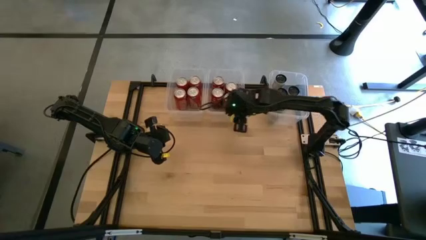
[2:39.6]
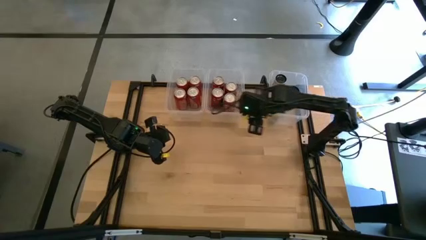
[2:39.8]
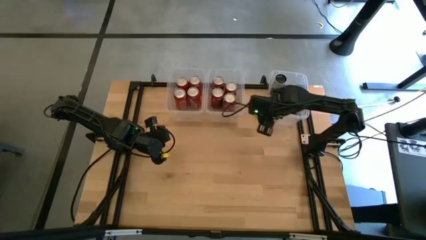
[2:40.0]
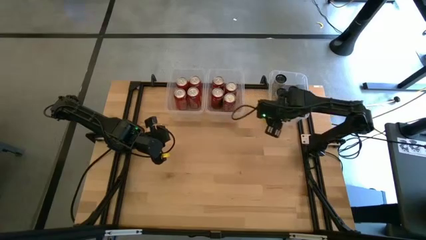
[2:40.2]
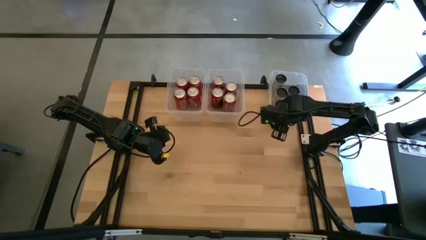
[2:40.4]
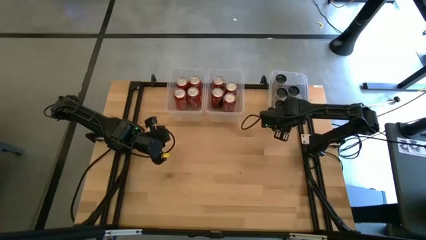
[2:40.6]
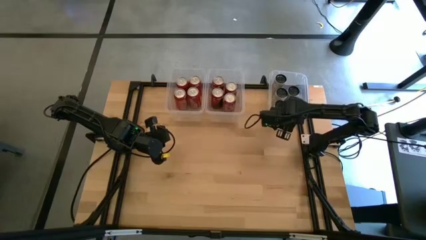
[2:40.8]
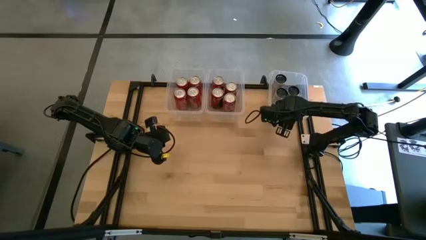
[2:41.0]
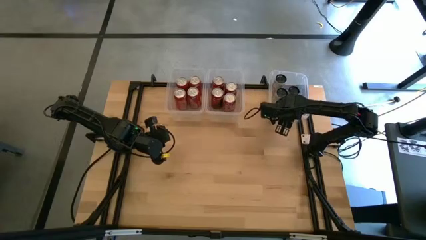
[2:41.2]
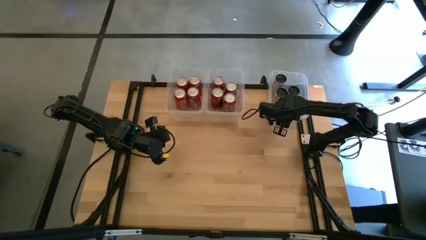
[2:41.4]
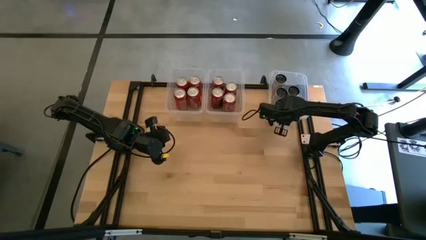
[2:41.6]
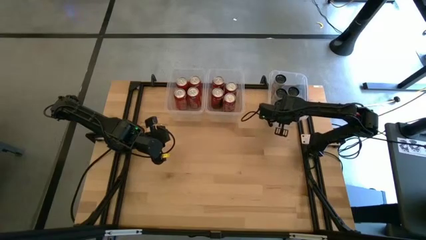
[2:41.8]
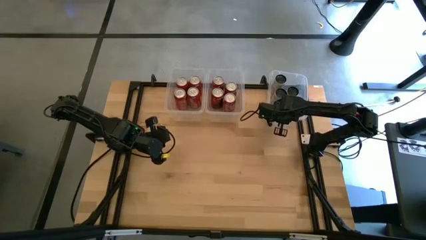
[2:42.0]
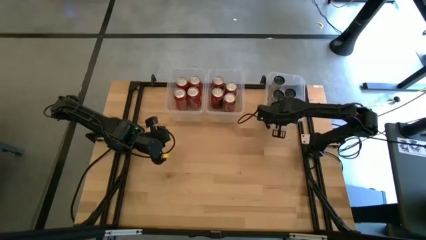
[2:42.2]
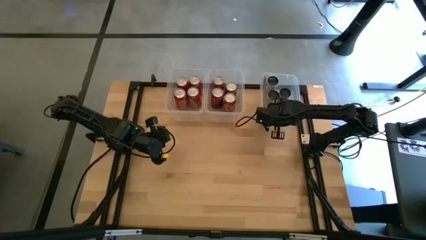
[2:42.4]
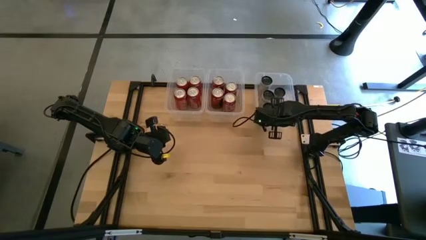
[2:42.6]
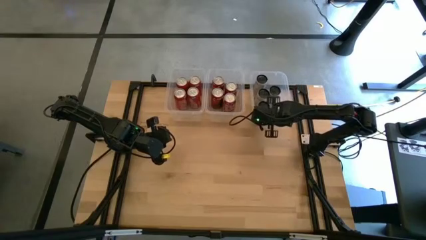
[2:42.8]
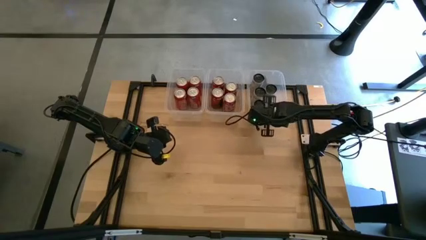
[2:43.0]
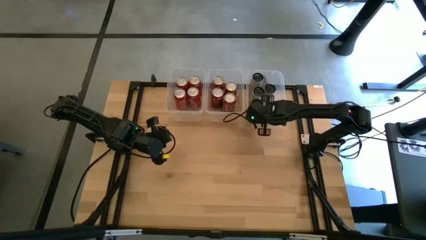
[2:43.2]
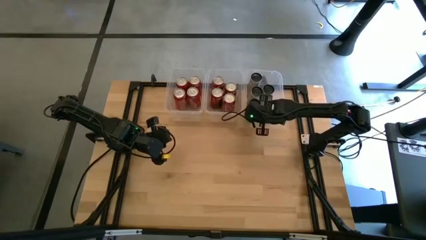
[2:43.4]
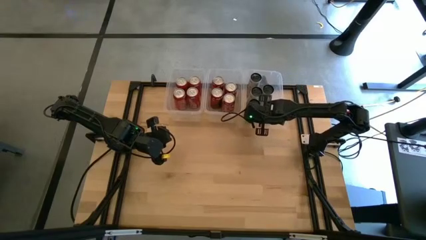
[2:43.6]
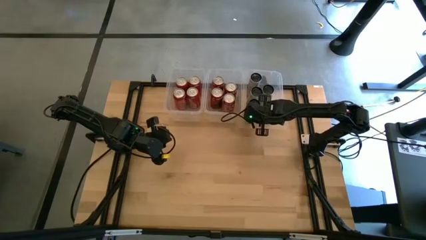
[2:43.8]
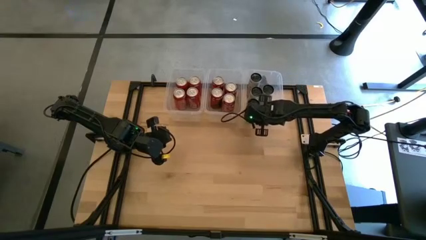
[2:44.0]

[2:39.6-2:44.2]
Task: Sort soda cans
Adjust the right transparent bin

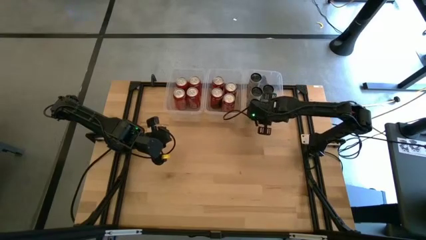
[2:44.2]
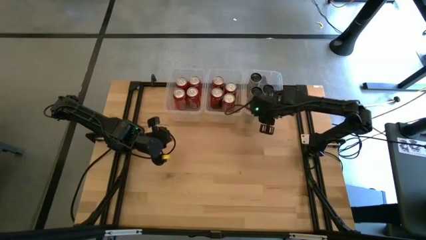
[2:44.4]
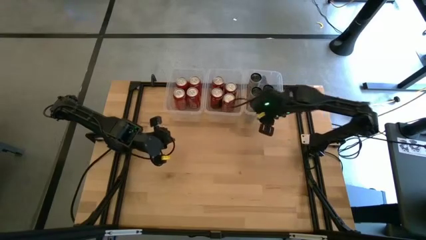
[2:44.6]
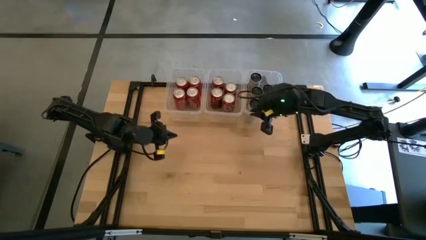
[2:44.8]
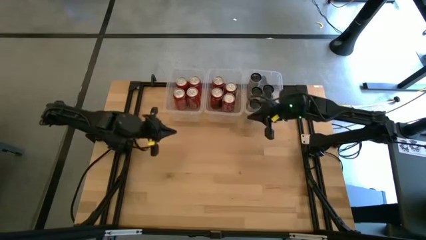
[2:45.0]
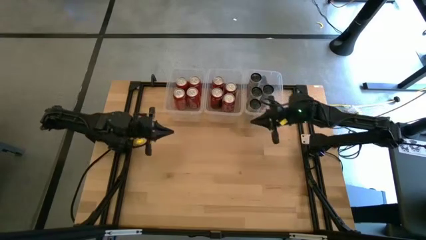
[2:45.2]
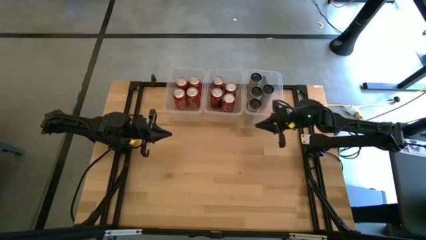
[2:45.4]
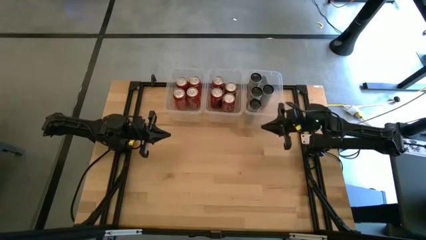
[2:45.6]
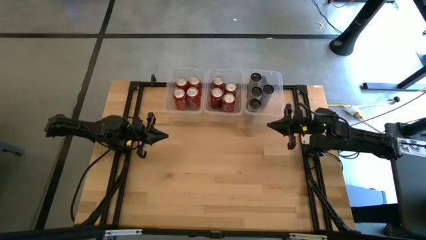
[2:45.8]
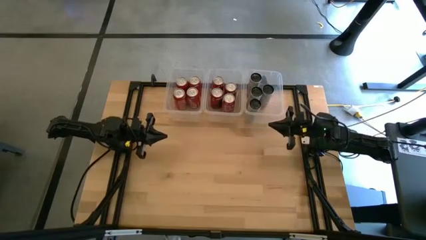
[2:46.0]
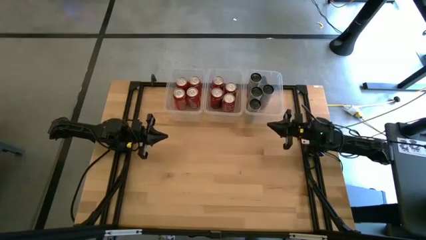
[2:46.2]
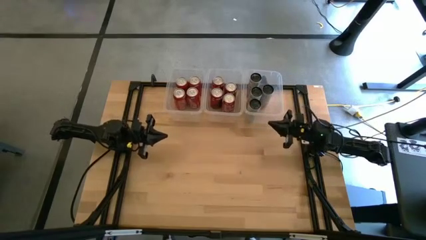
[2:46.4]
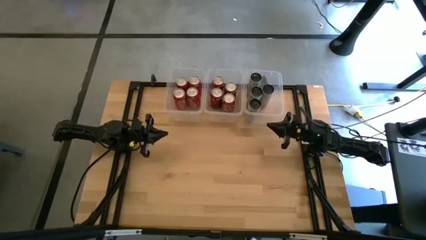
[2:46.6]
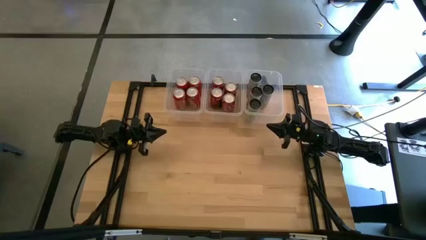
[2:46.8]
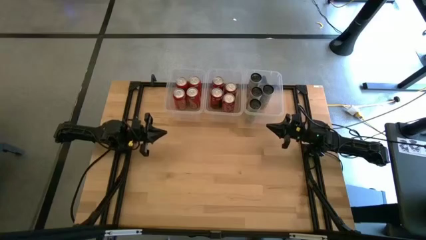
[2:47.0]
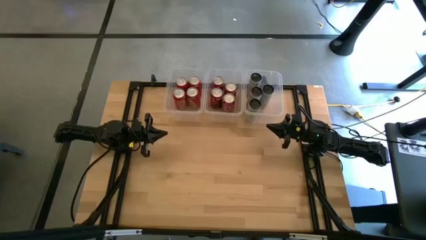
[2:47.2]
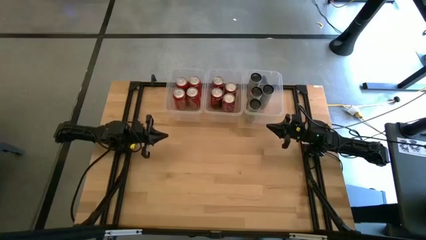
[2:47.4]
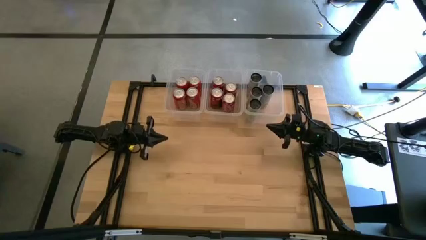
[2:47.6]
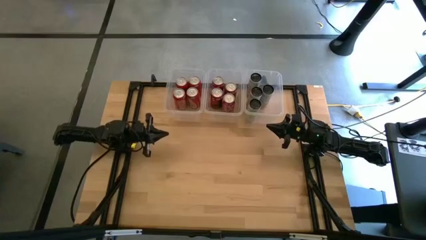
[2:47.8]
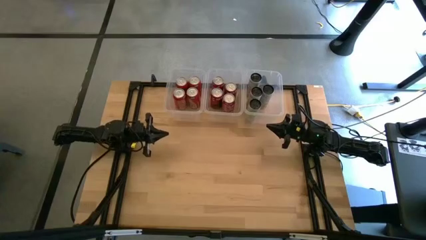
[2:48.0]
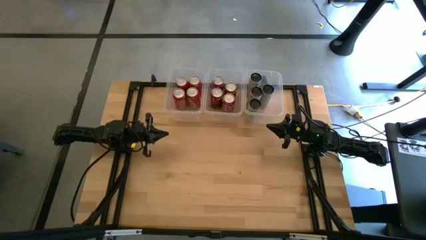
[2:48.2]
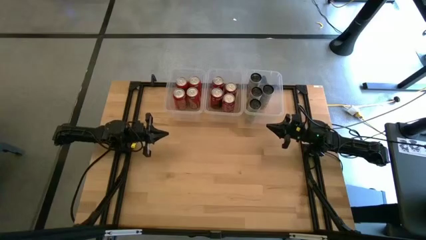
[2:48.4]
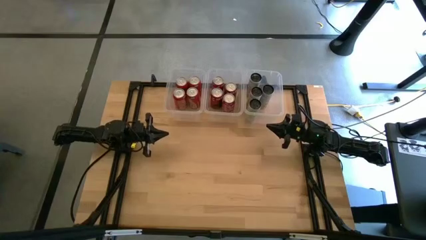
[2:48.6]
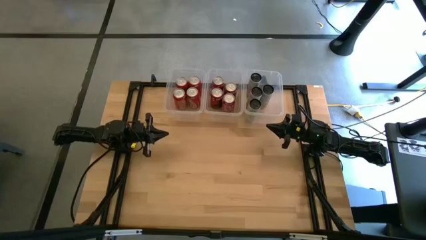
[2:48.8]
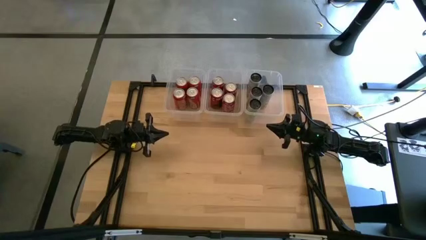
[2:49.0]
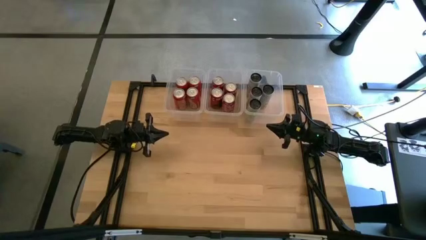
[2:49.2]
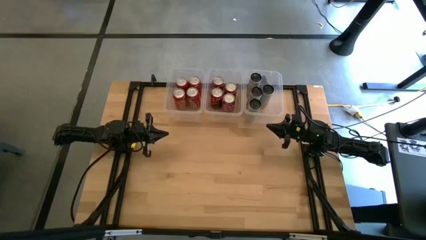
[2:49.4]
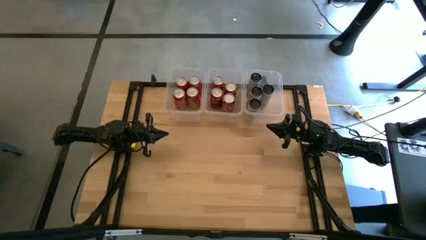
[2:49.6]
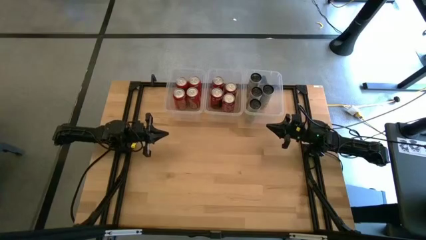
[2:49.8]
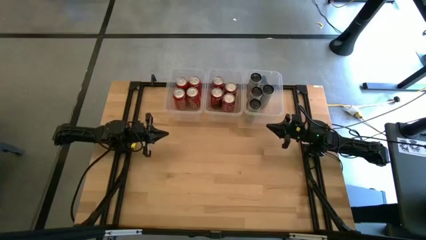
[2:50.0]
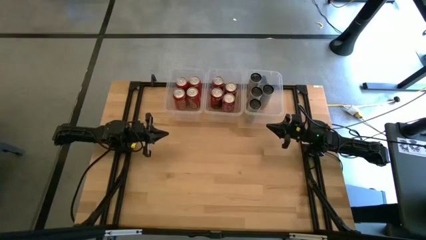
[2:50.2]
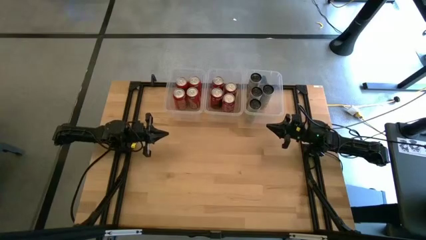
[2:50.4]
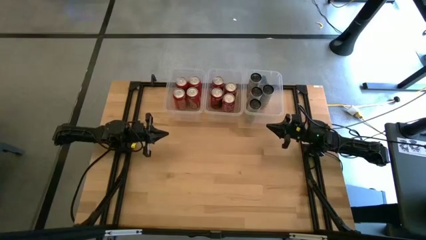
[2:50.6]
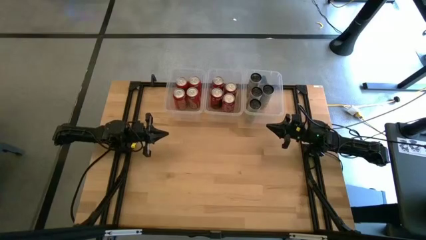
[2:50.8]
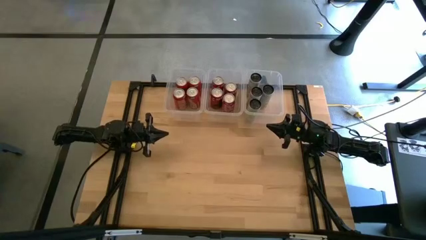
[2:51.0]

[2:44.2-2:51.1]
Return to Home Position
